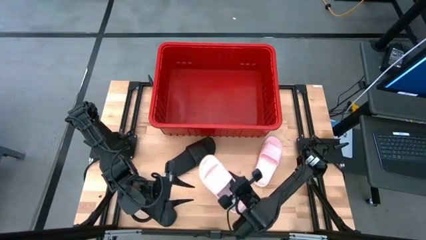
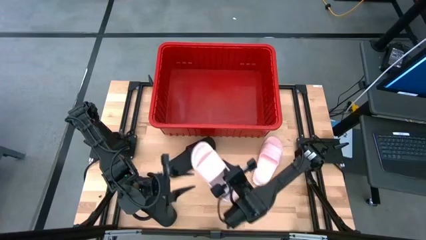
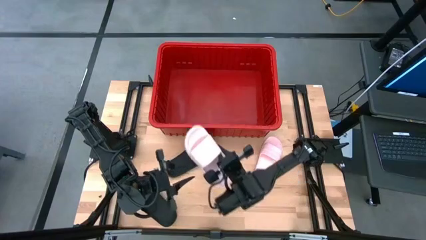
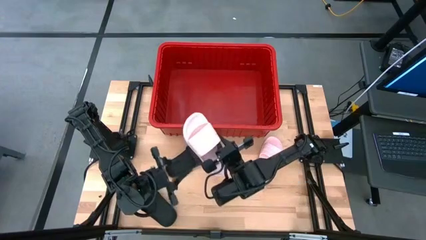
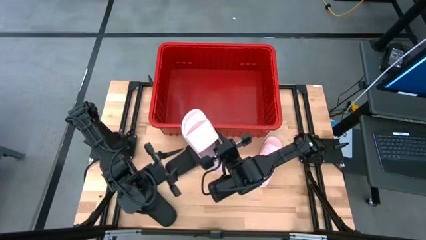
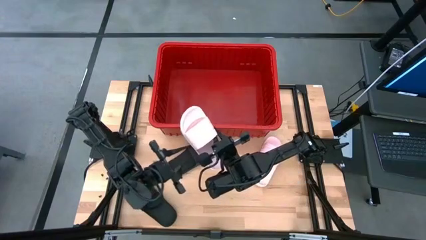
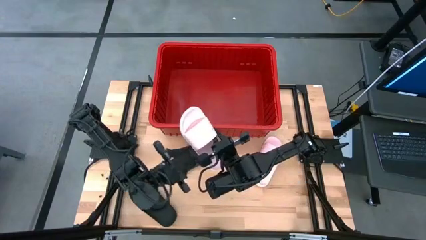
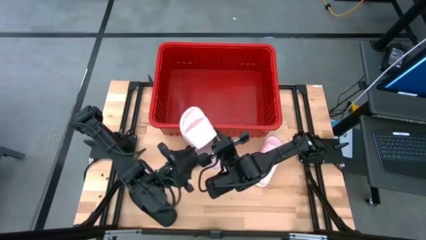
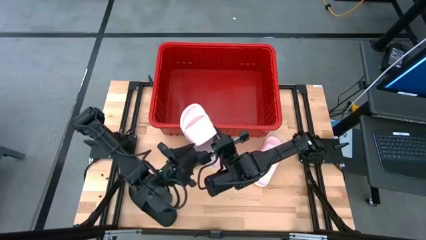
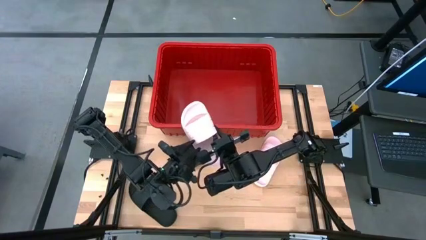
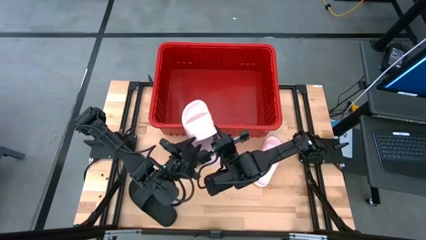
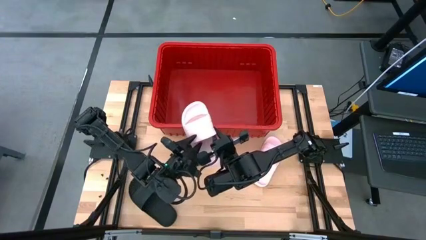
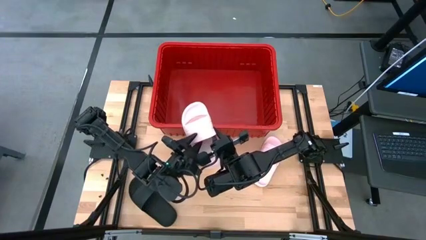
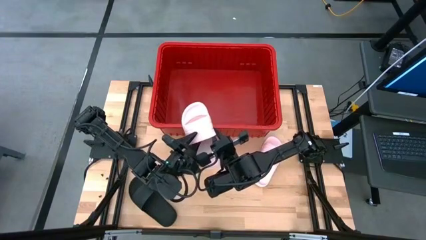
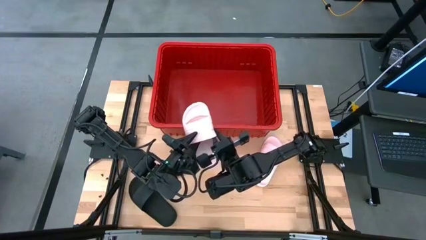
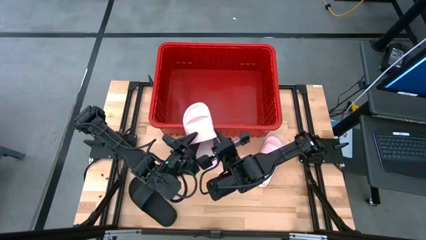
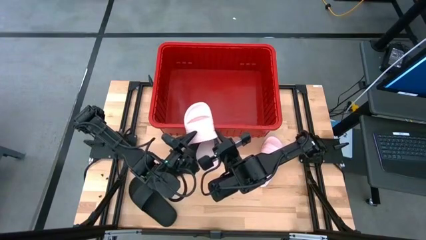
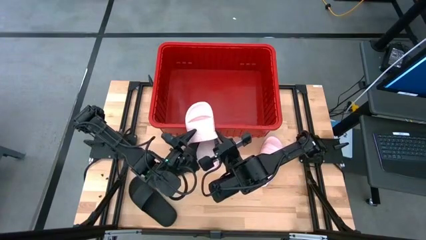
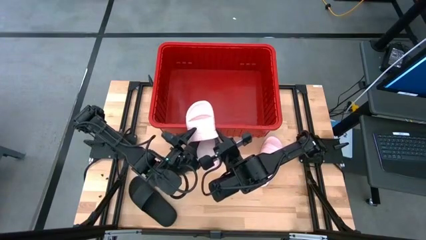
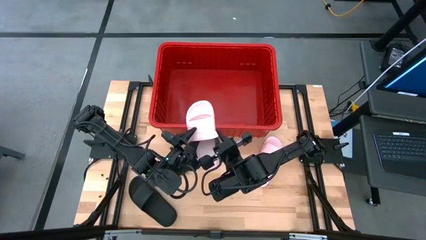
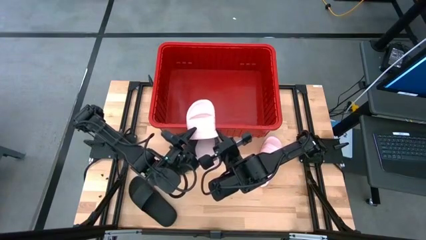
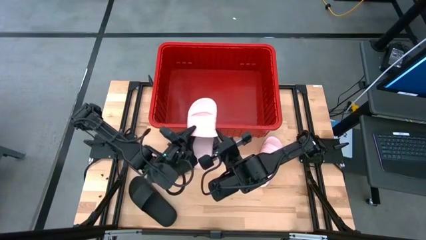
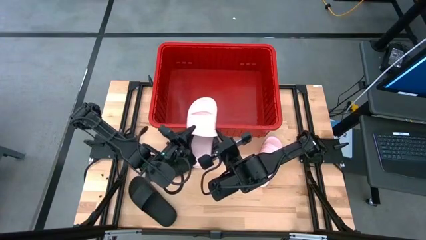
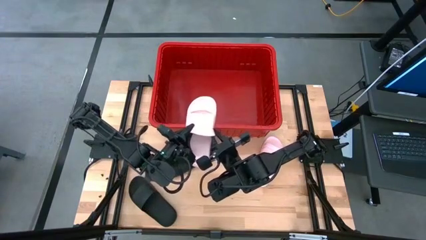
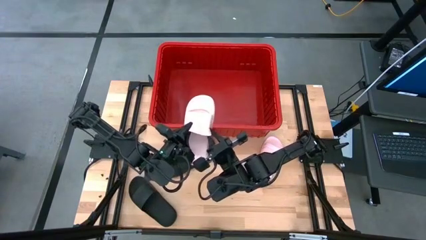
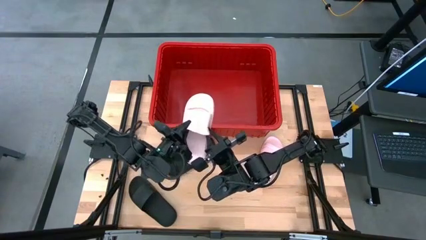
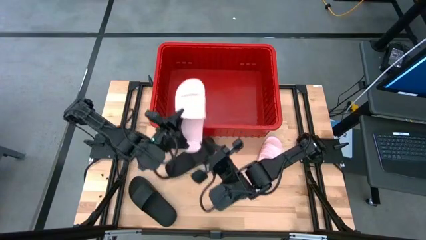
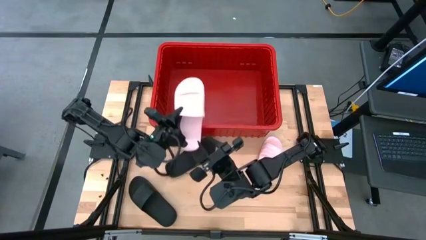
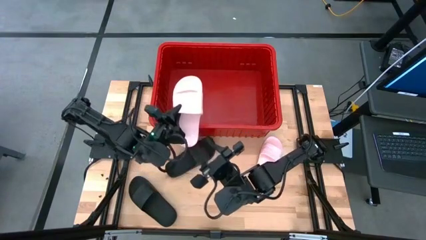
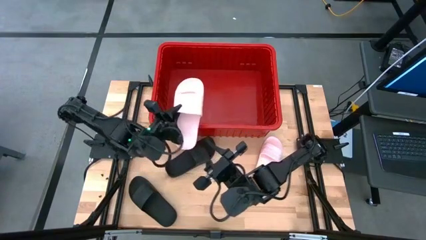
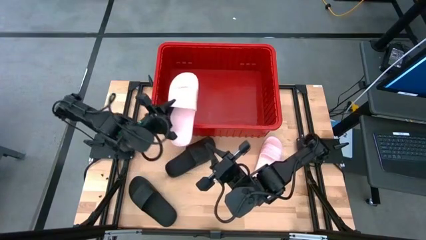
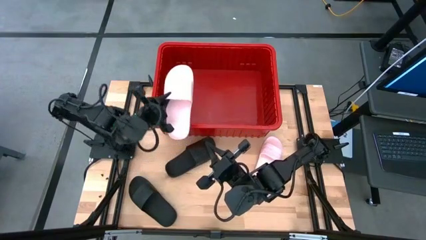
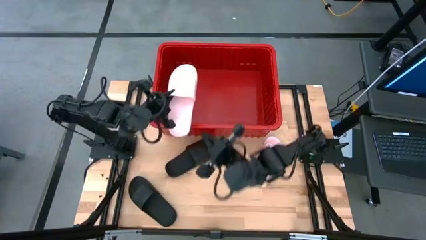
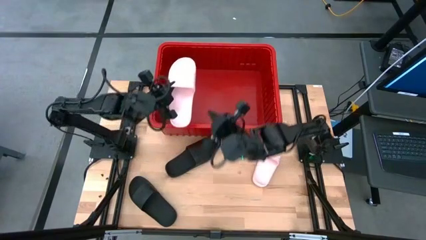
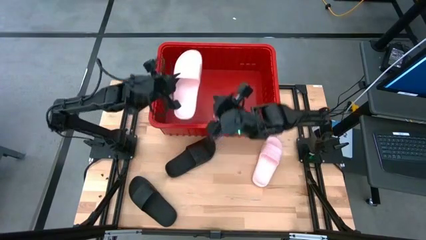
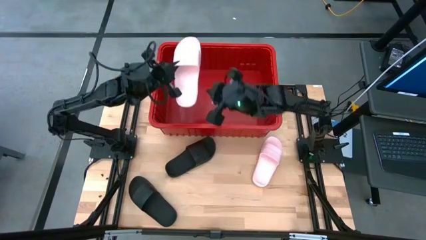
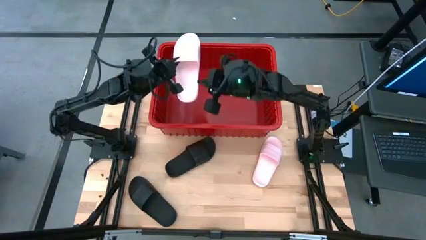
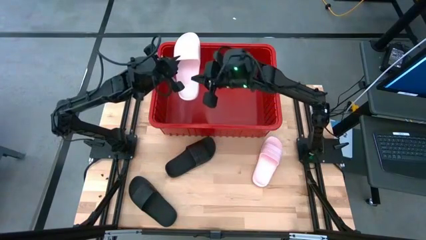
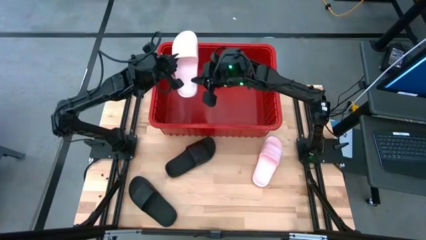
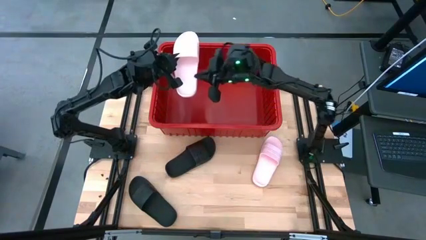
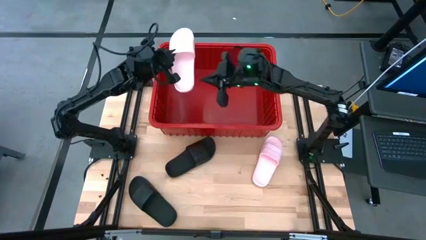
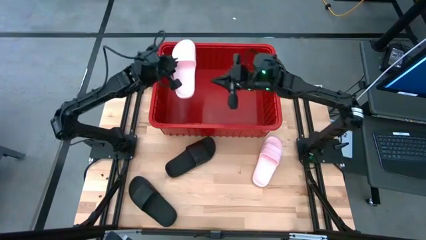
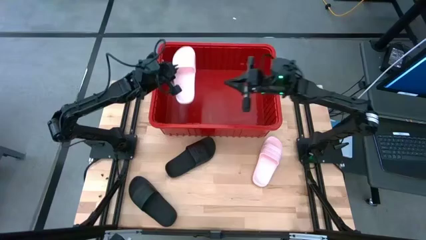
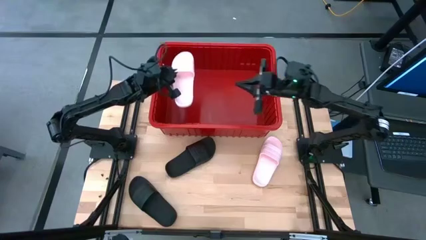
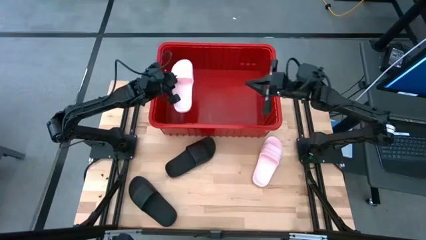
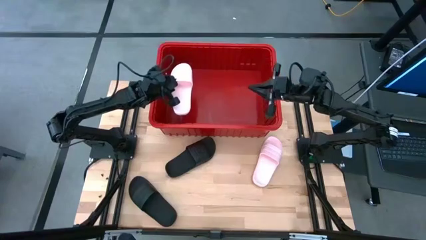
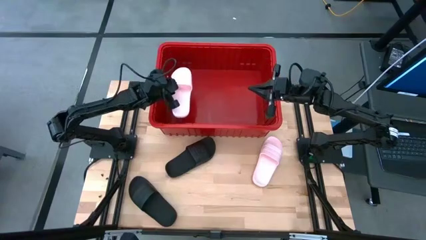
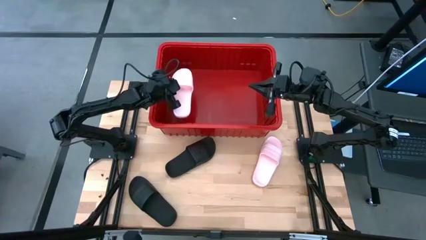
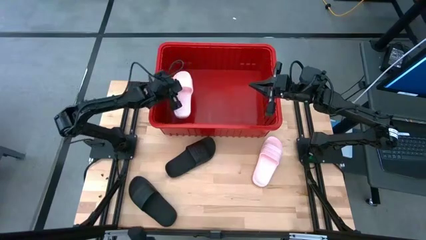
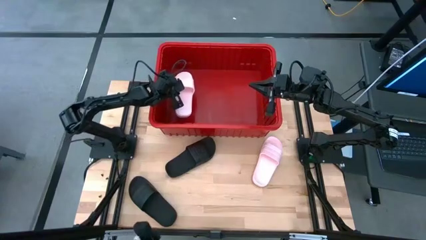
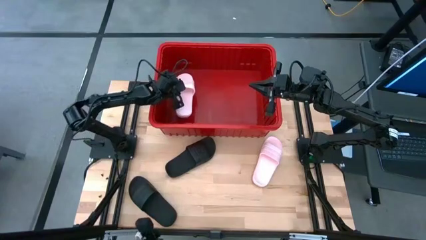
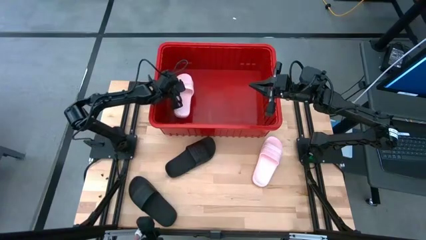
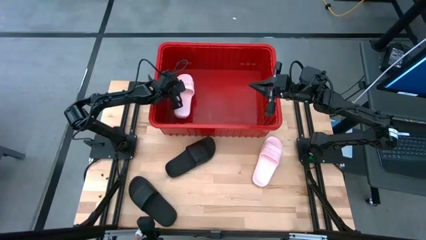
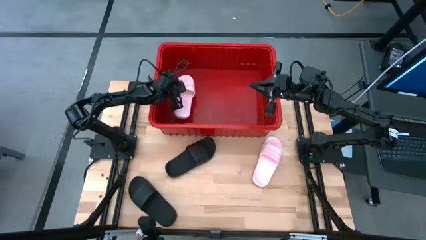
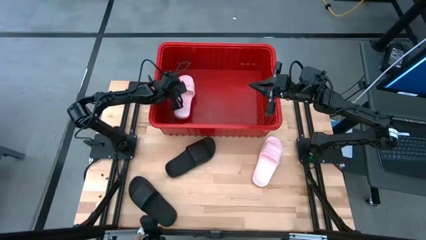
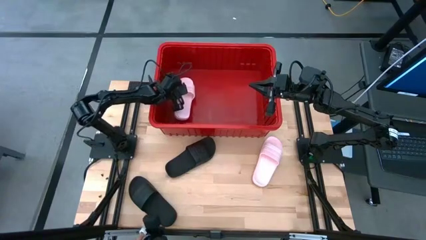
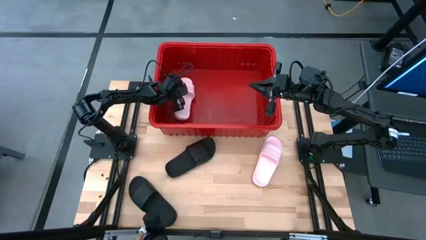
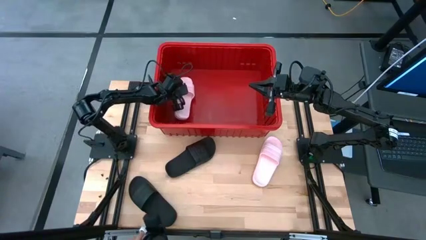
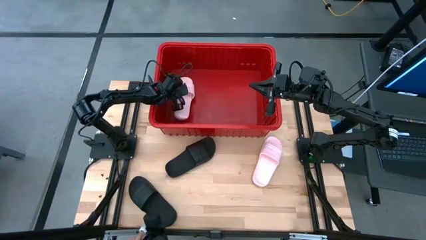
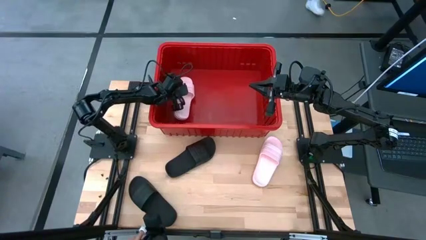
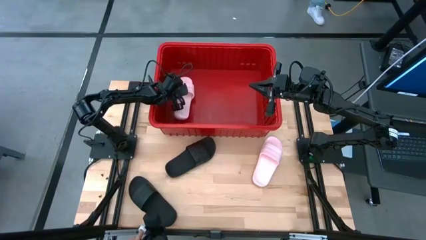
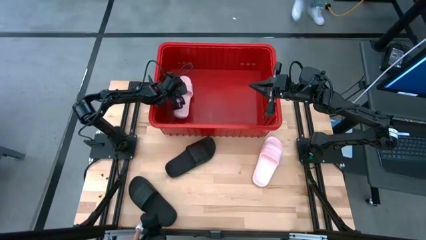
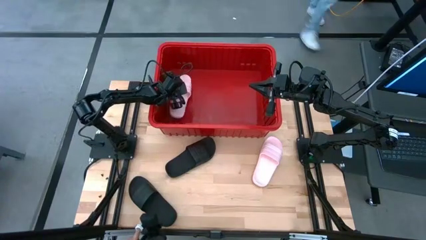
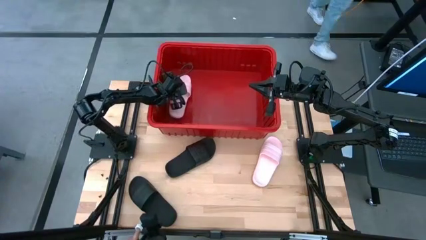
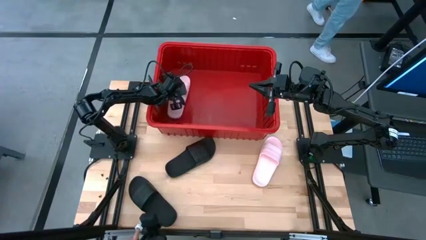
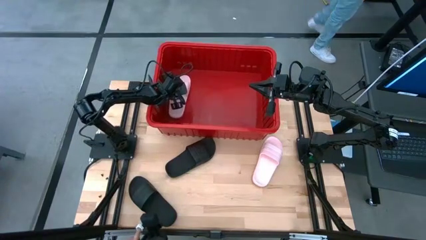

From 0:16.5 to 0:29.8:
Task: Pick and place slides into bin
Put the bottom pink slide into the red bin
